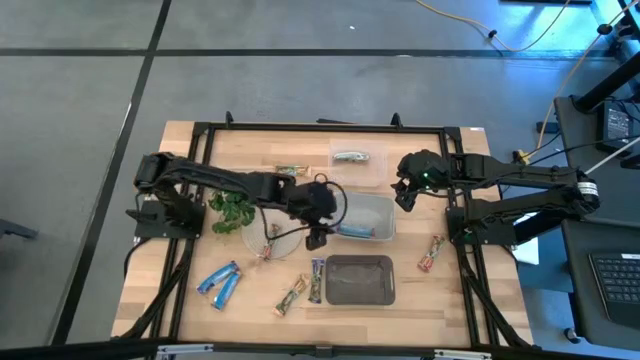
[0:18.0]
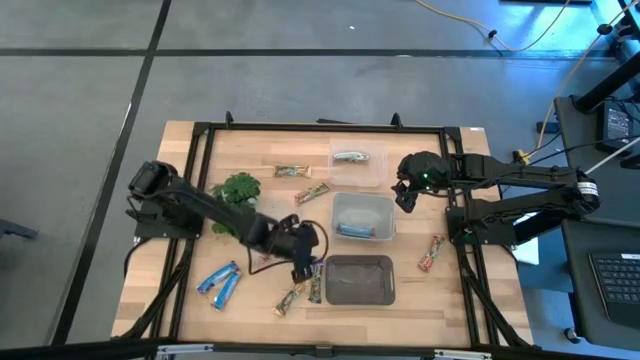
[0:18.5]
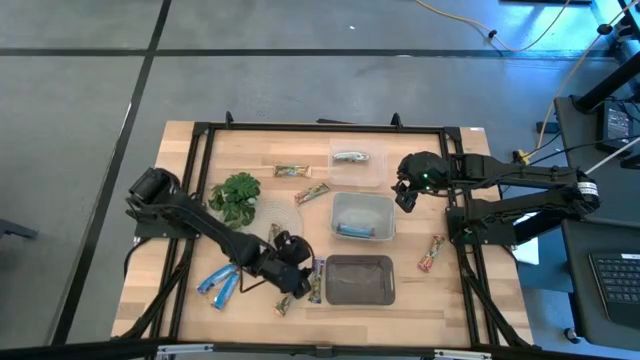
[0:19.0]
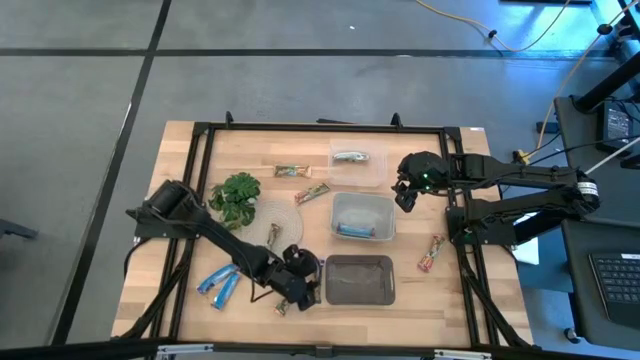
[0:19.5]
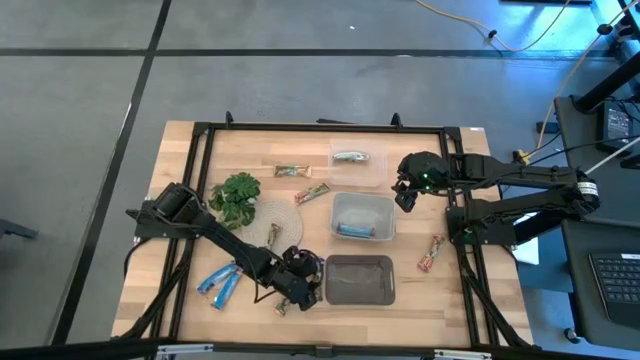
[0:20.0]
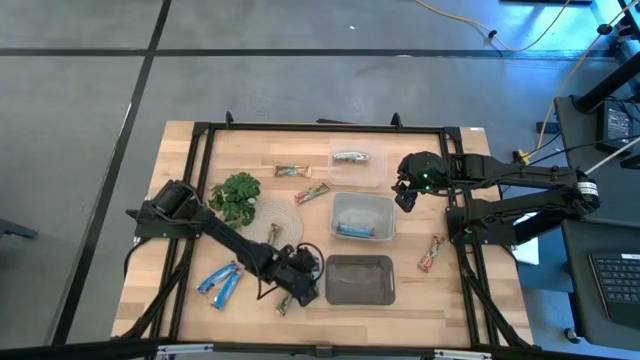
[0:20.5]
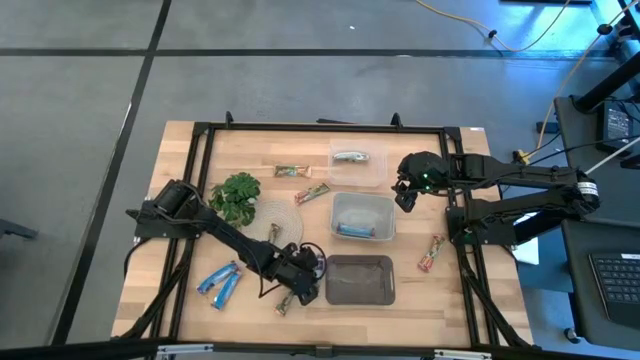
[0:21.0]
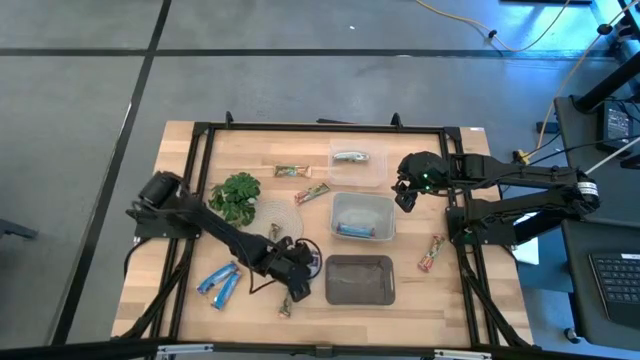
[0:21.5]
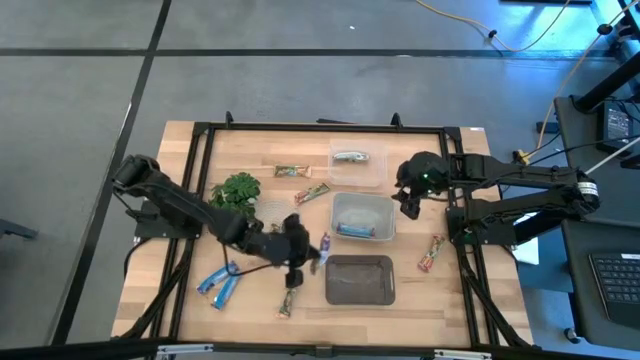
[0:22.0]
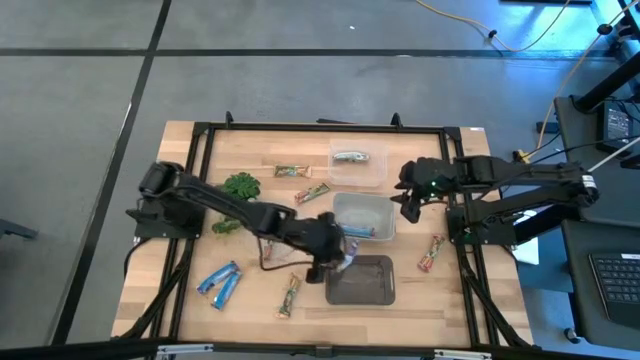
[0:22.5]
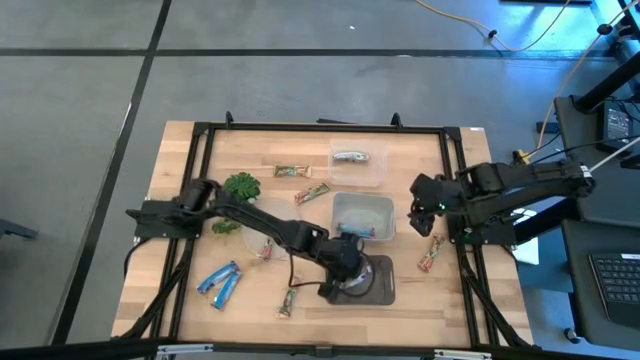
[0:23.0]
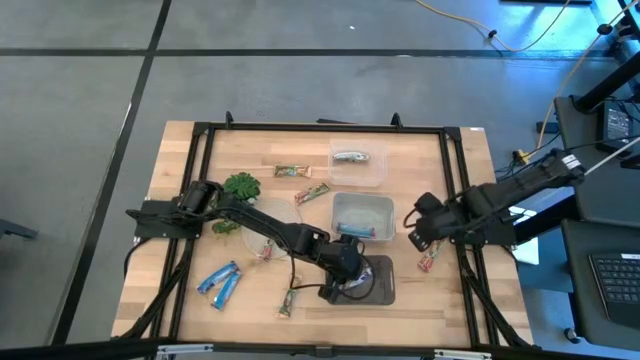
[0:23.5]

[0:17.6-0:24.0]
Task: Pick and place Granola Bars by type
Put the blue granola bar into the black bin

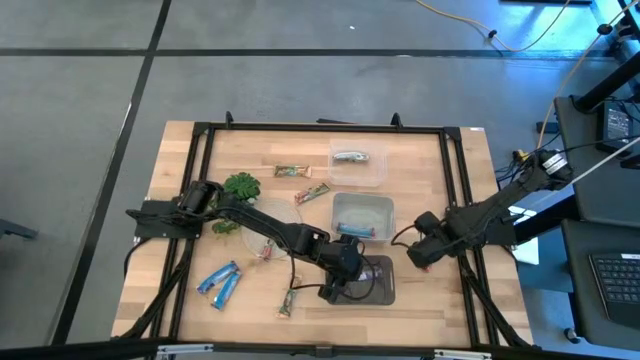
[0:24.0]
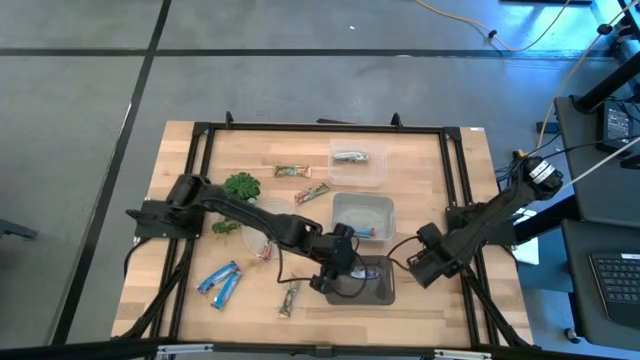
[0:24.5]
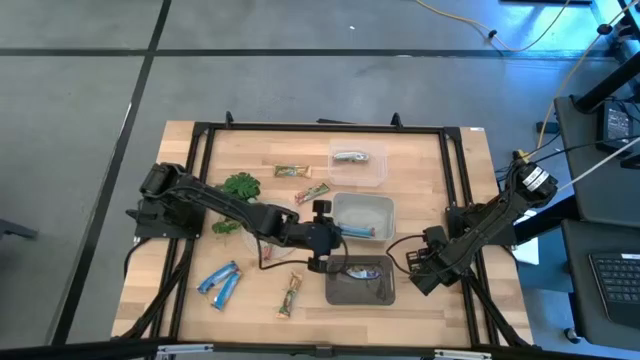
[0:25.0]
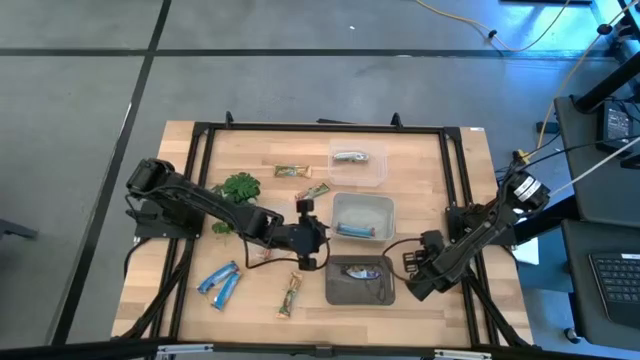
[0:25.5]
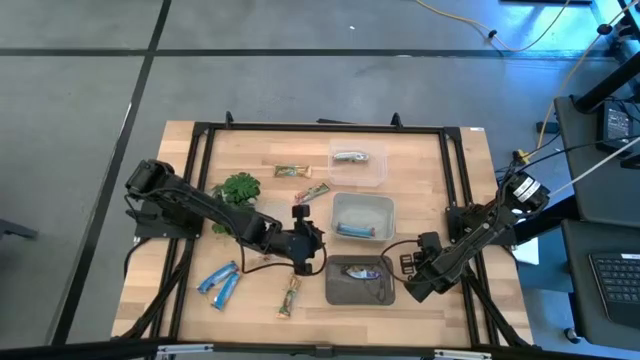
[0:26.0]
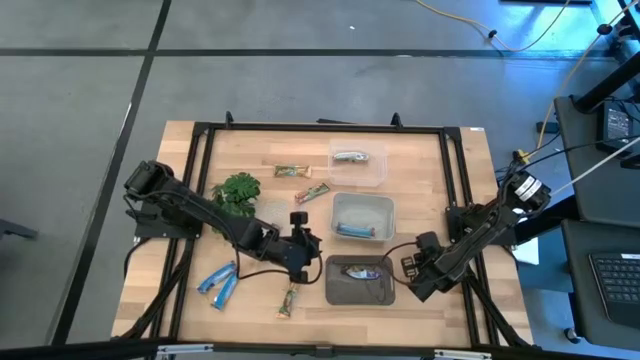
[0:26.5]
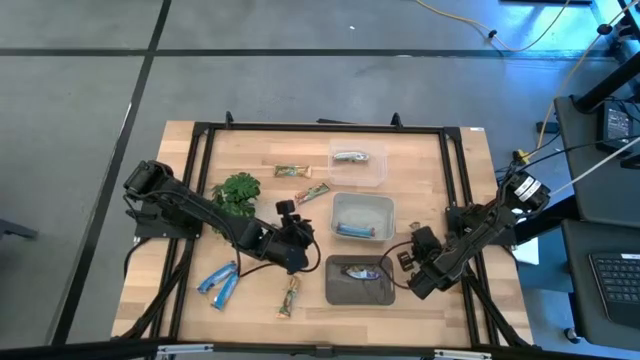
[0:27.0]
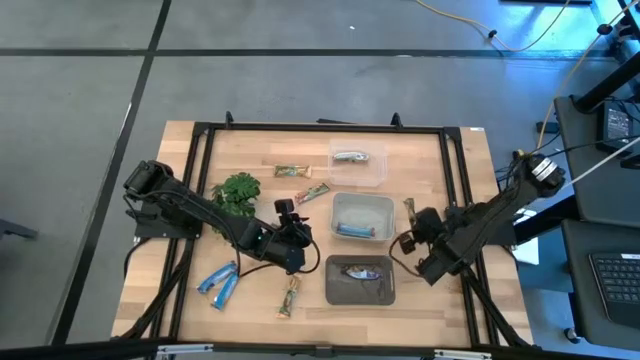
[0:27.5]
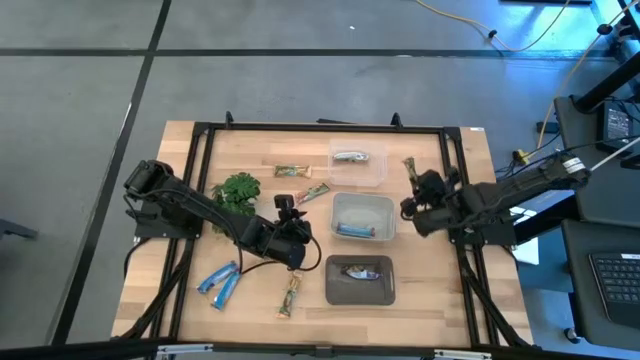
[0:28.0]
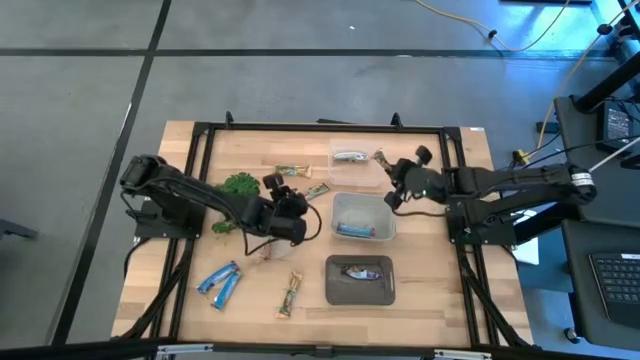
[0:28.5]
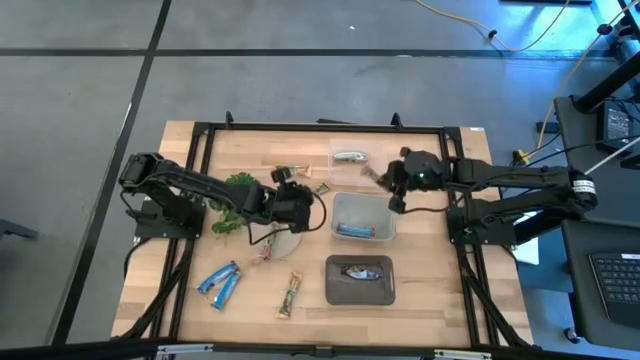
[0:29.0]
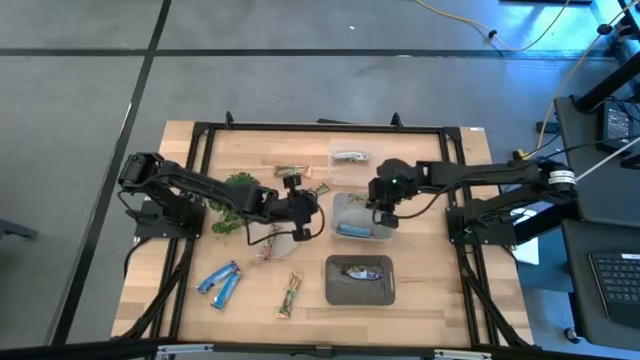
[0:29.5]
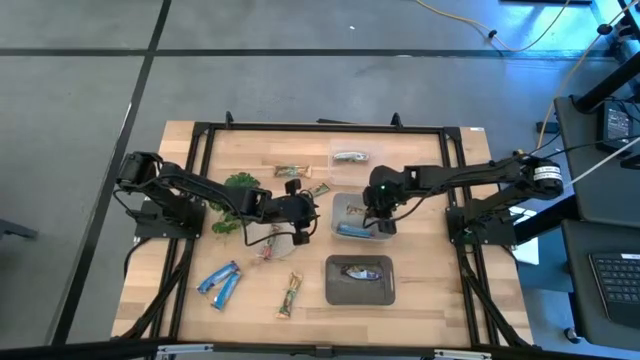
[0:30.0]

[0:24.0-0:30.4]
Put the red granola bar into the gray bin

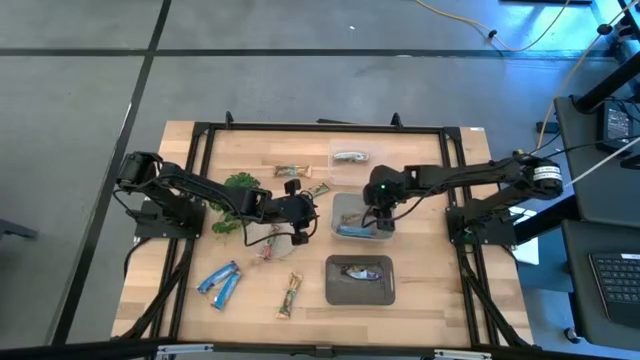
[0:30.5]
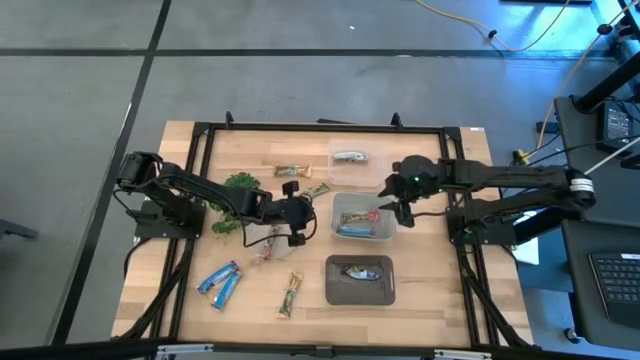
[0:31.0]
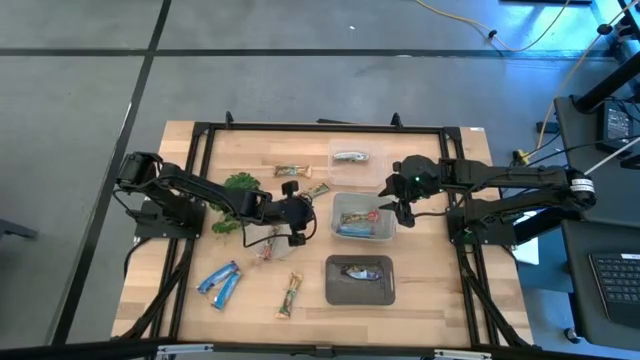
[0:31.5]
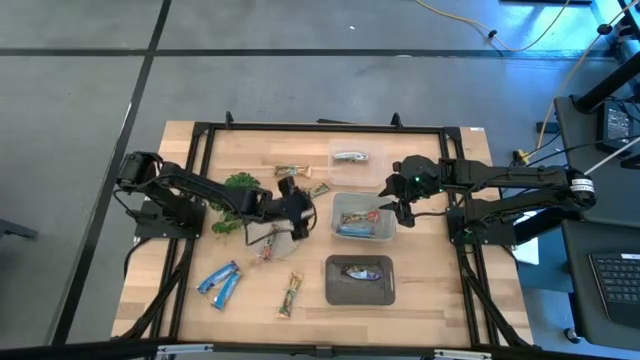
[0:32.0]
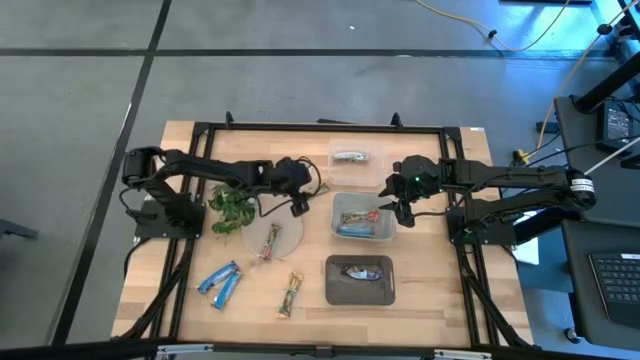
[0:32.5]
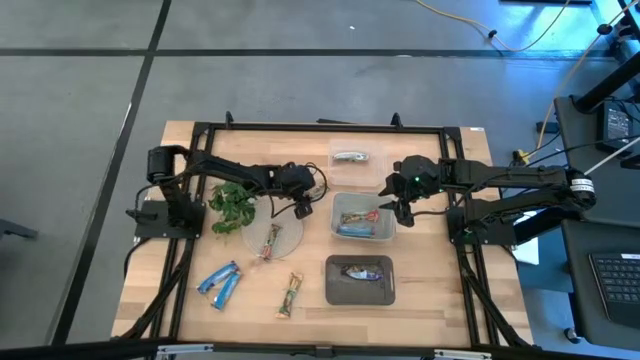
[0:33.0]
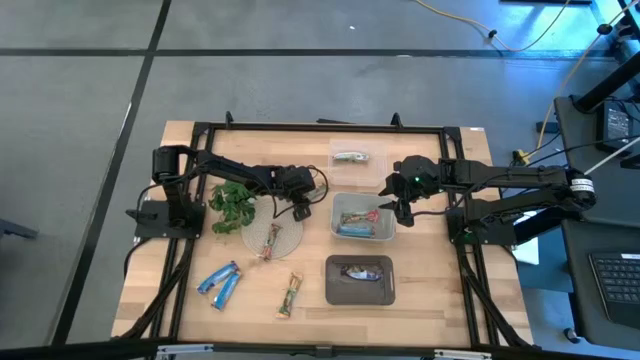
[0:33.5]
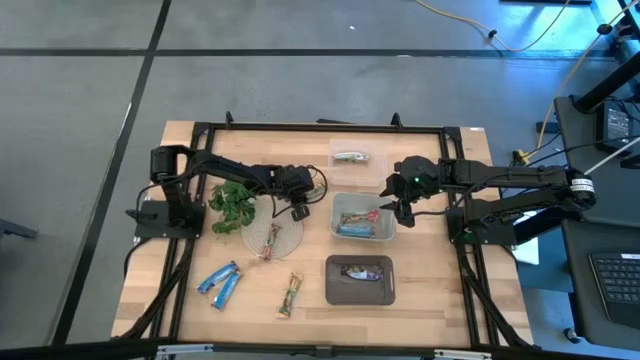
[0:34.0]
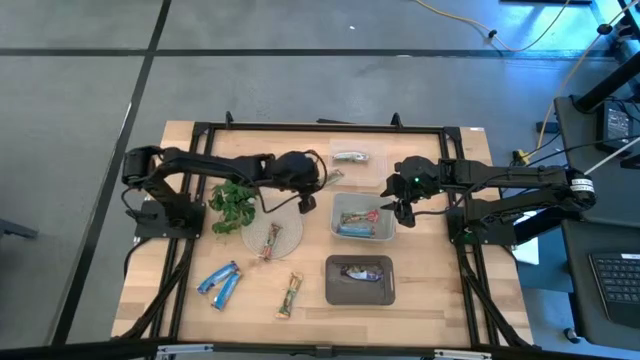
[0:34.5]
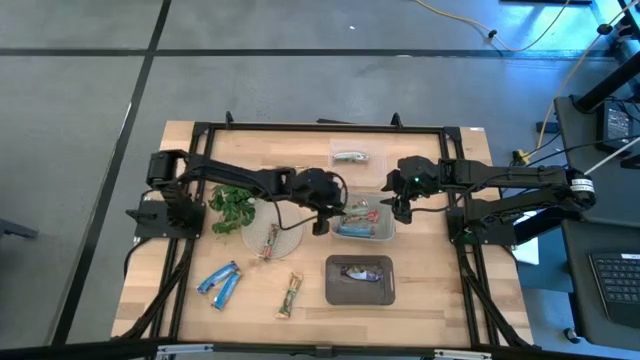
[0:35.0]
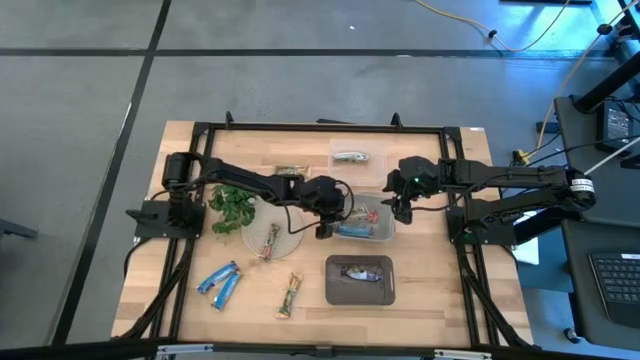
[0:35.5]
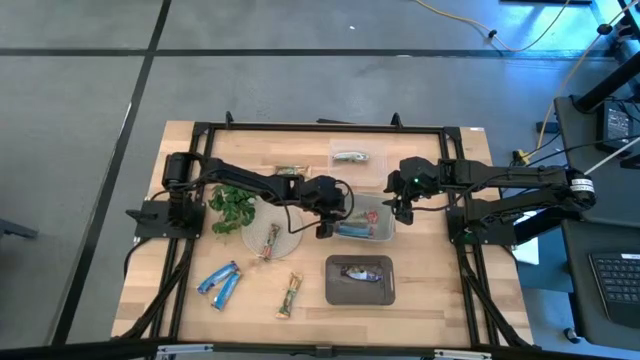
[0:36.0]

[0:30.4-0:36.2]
Put the red granola bar into the gray bin

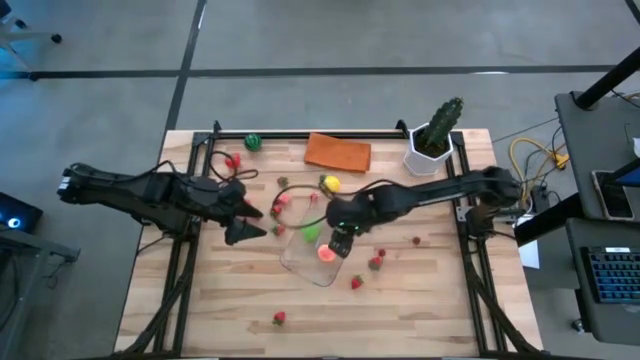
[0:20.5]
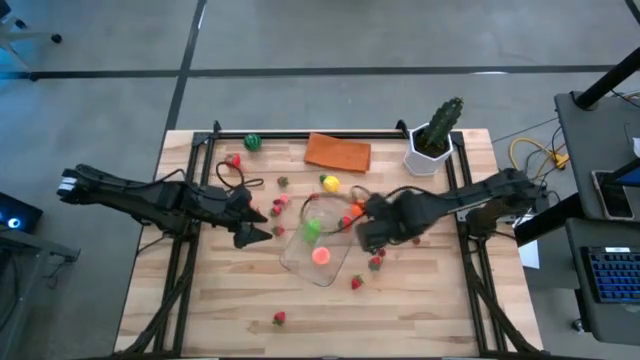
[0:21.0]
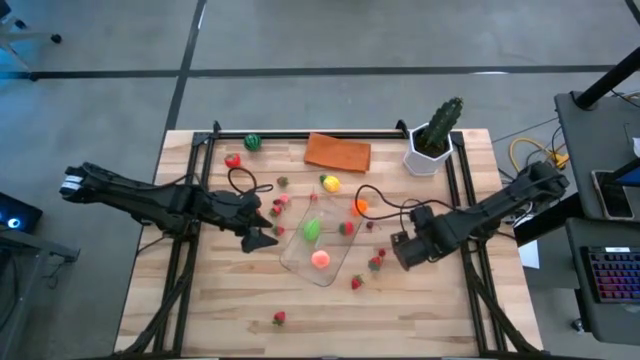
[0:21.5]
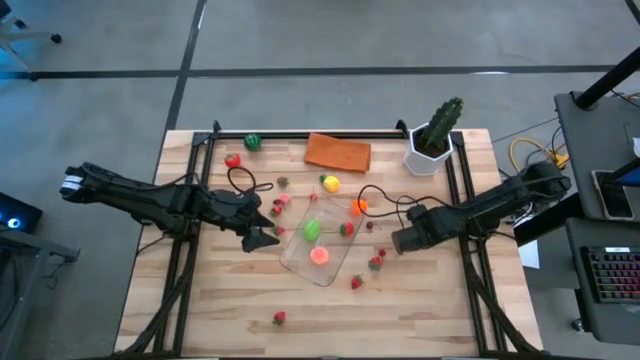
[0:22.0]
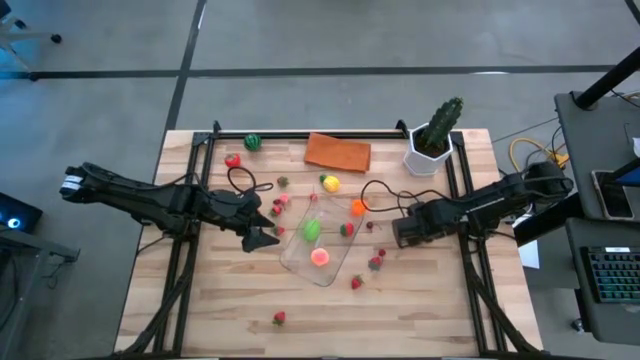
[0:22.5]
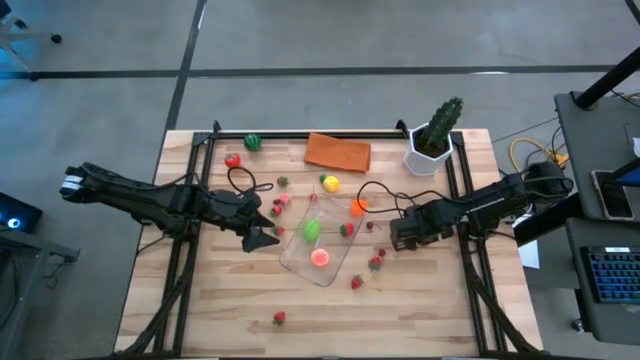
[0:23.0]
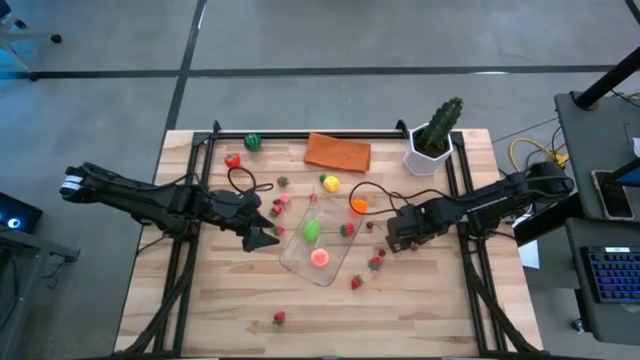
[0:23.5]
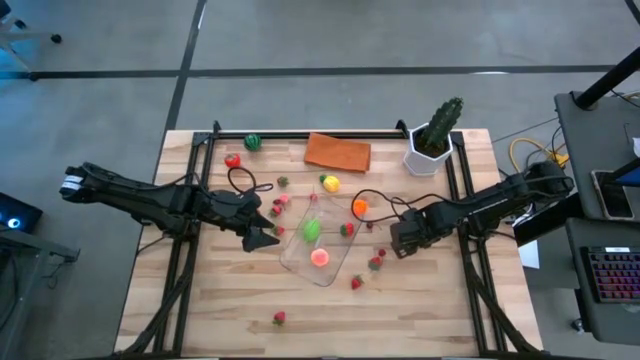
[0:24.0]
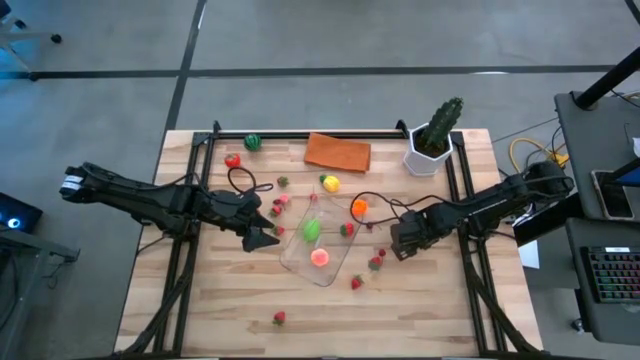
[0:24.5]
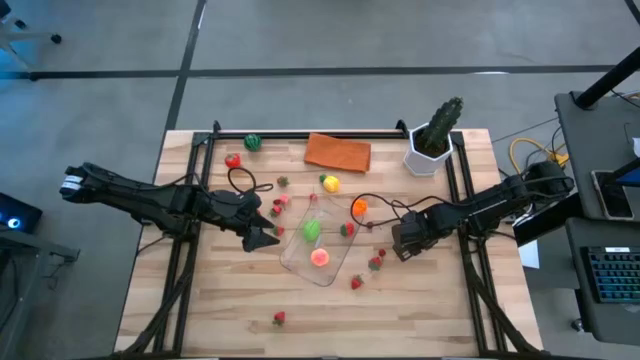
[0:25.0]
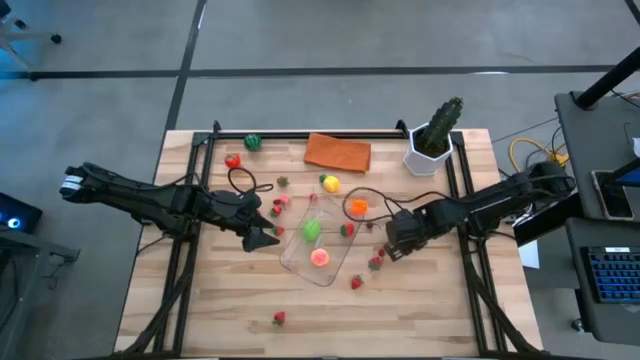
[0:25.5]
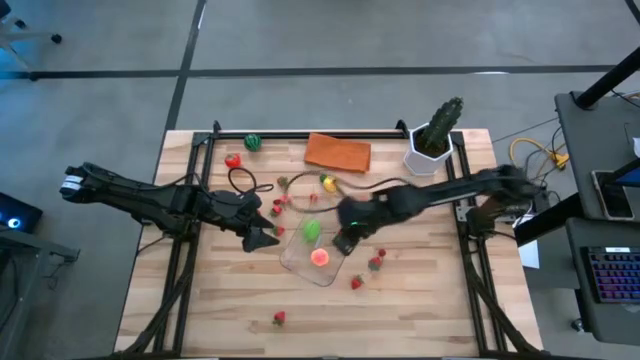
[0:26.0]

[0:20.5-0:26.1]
Task: Pick and placing Produce into tupperware
Put the red cherry into the transparent bin
